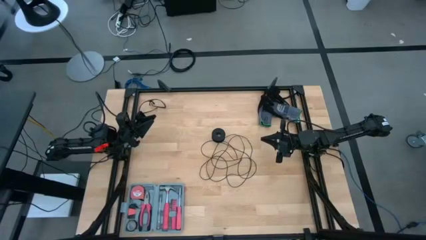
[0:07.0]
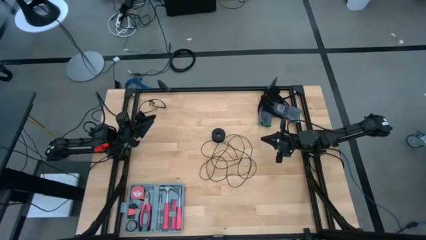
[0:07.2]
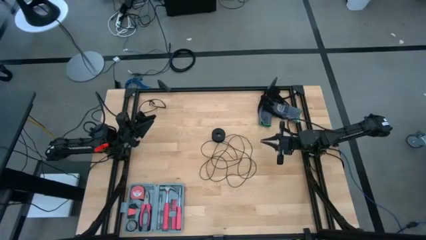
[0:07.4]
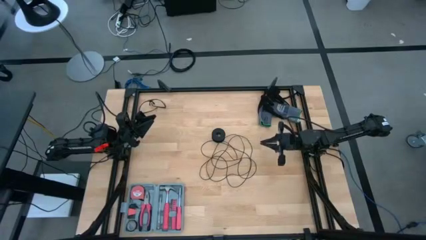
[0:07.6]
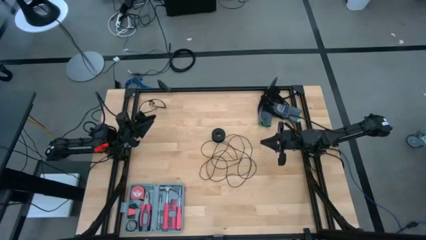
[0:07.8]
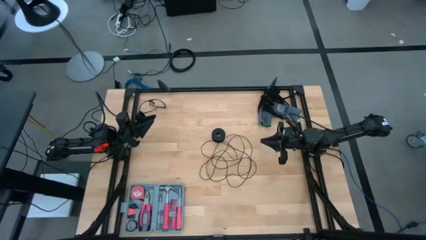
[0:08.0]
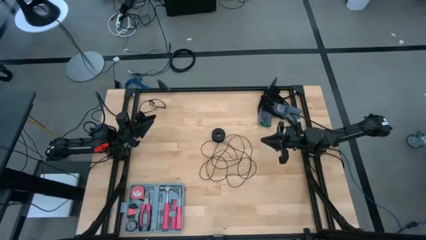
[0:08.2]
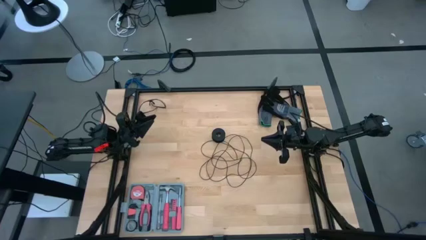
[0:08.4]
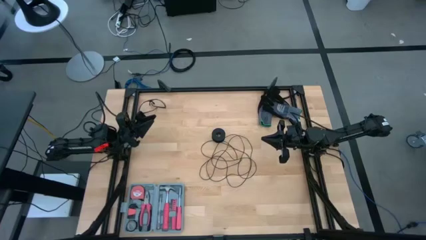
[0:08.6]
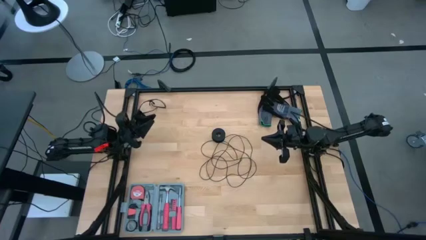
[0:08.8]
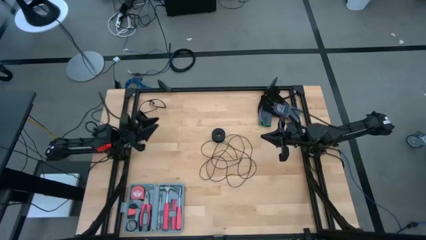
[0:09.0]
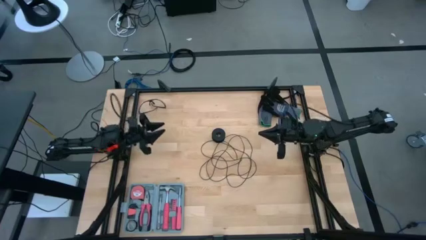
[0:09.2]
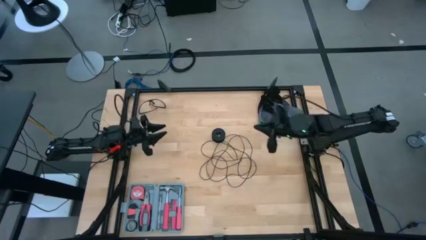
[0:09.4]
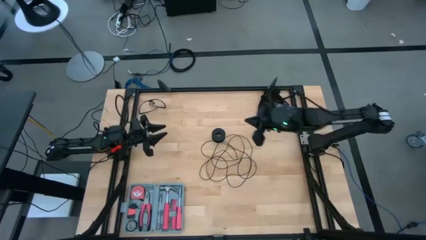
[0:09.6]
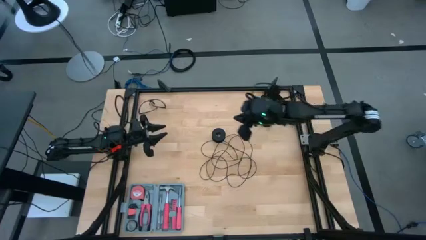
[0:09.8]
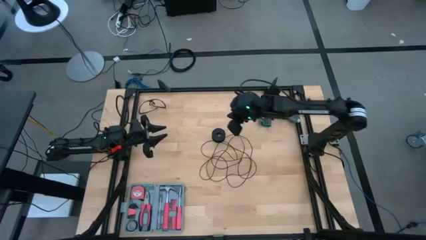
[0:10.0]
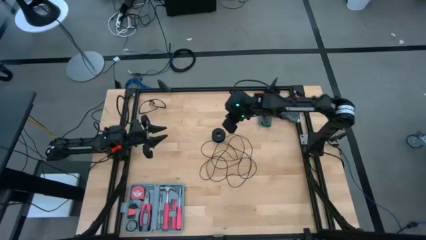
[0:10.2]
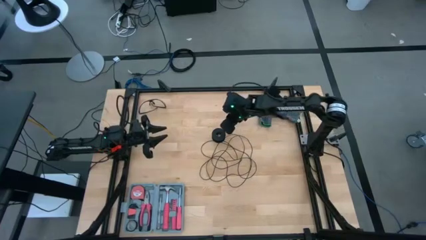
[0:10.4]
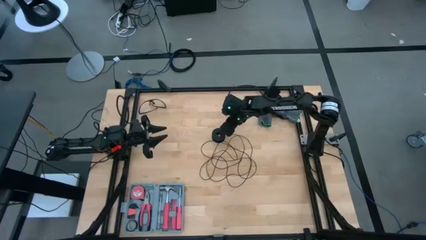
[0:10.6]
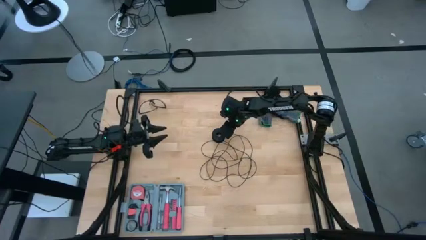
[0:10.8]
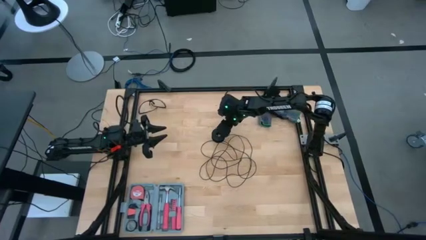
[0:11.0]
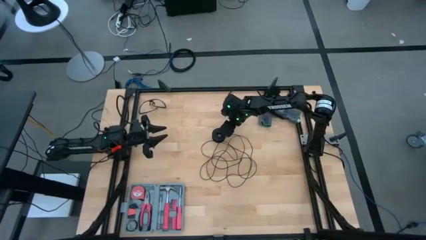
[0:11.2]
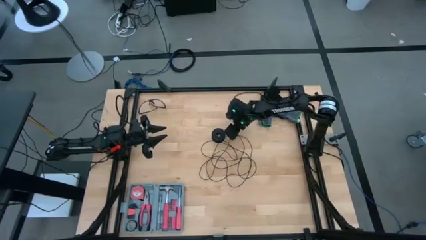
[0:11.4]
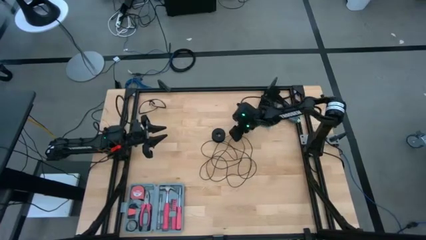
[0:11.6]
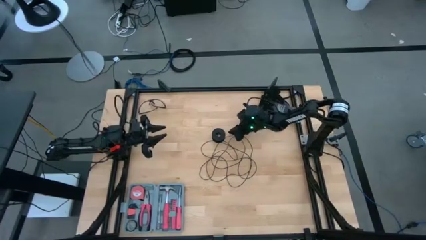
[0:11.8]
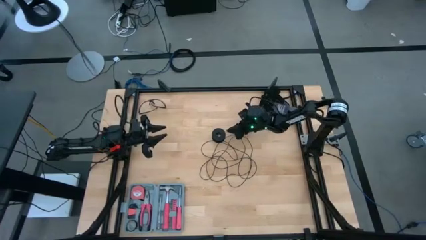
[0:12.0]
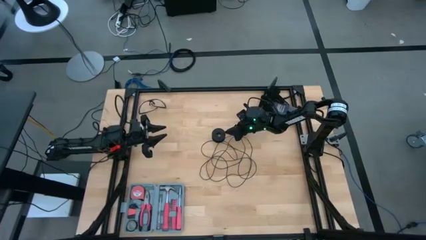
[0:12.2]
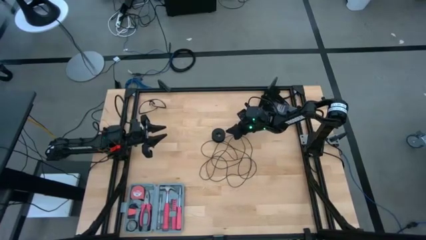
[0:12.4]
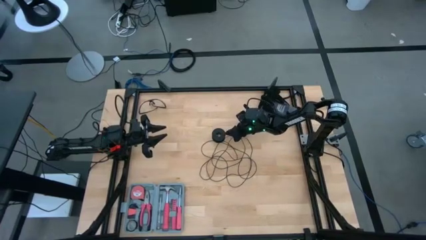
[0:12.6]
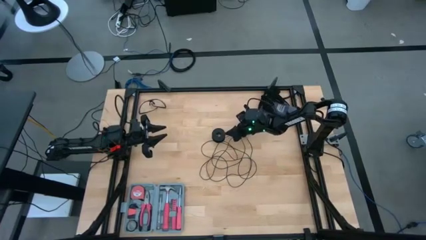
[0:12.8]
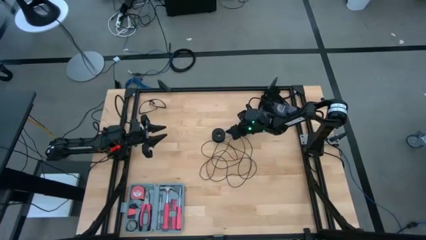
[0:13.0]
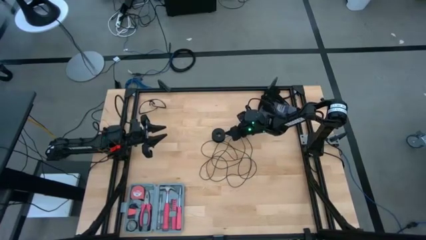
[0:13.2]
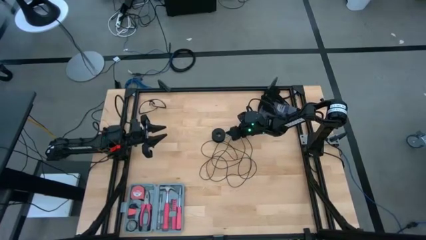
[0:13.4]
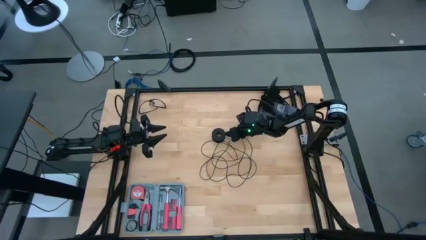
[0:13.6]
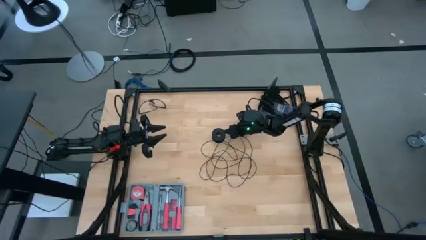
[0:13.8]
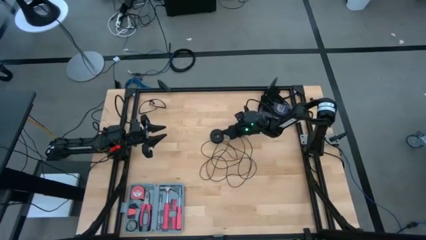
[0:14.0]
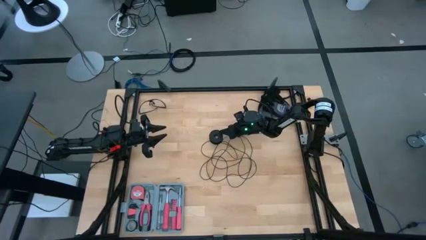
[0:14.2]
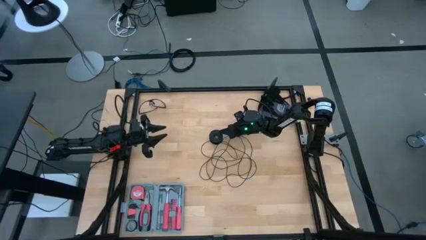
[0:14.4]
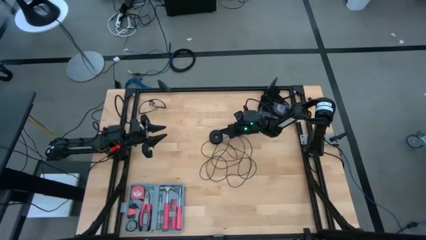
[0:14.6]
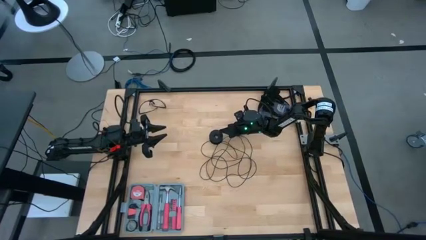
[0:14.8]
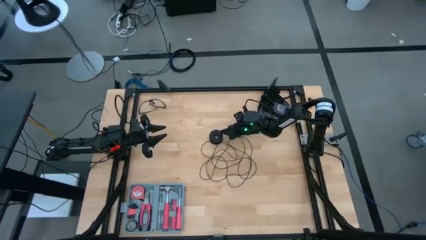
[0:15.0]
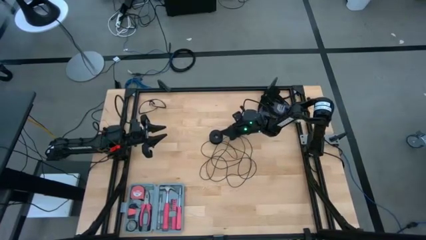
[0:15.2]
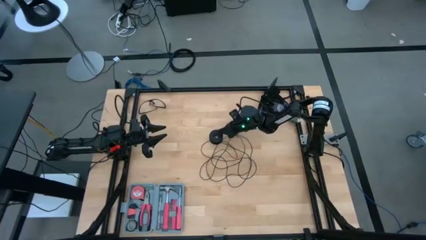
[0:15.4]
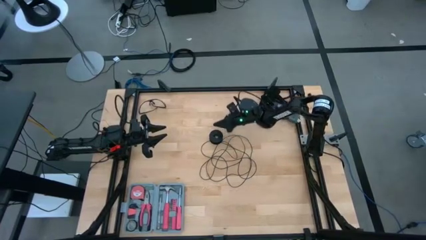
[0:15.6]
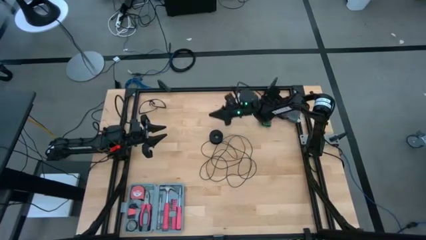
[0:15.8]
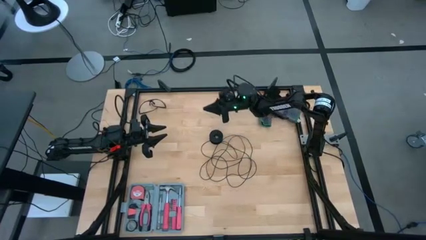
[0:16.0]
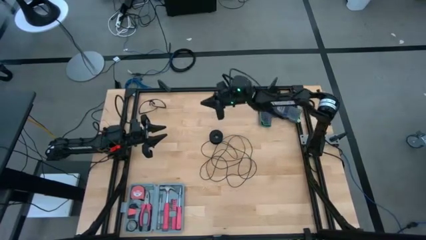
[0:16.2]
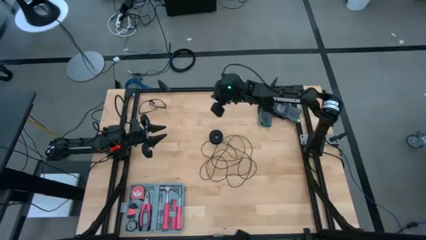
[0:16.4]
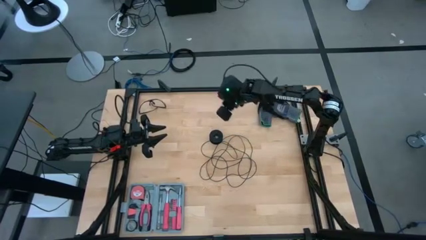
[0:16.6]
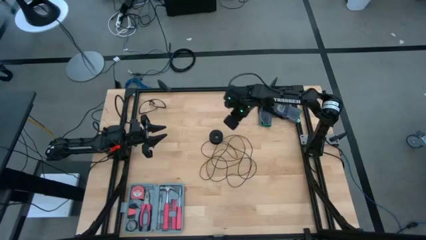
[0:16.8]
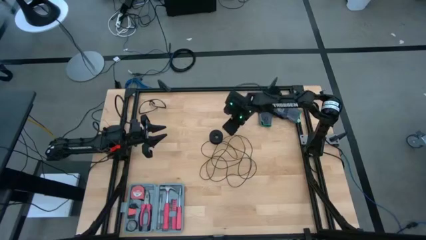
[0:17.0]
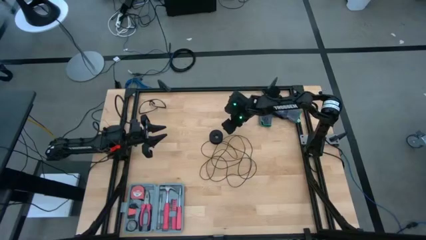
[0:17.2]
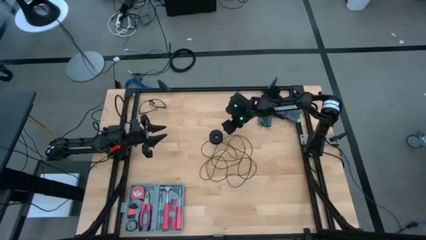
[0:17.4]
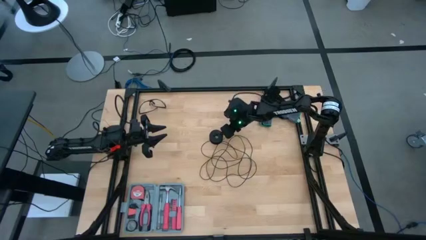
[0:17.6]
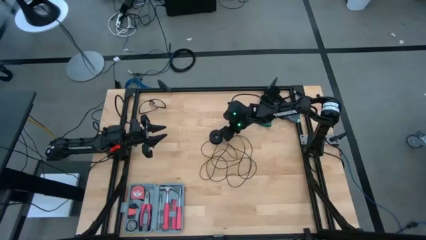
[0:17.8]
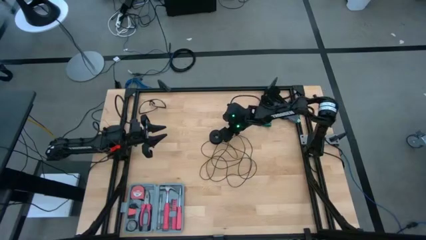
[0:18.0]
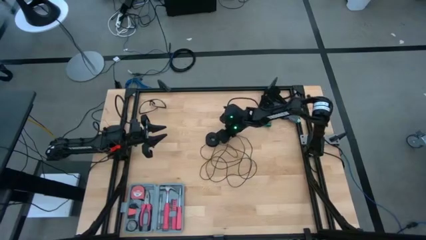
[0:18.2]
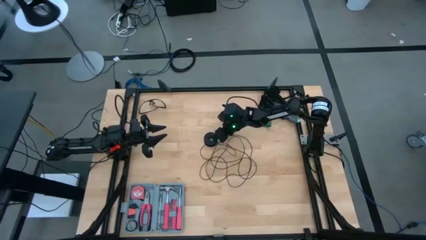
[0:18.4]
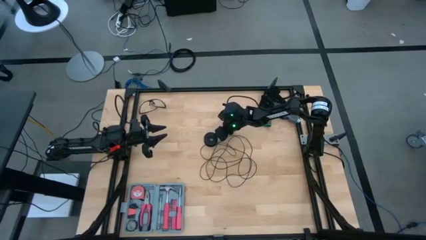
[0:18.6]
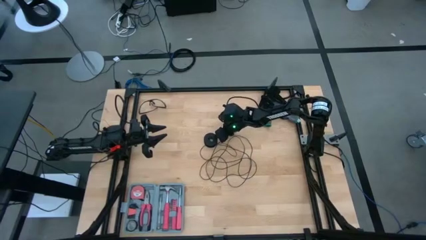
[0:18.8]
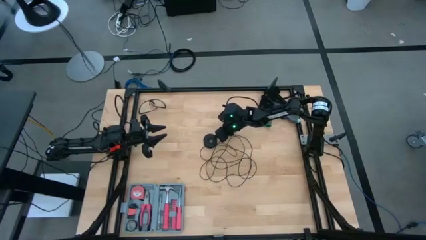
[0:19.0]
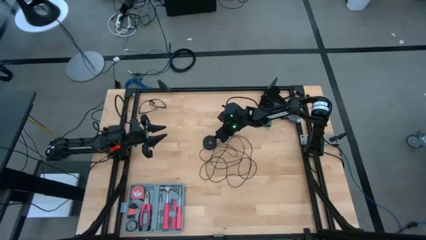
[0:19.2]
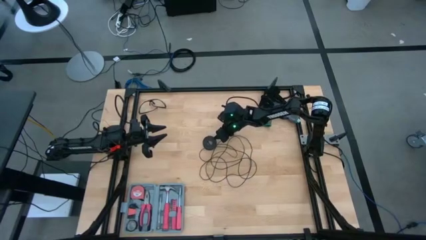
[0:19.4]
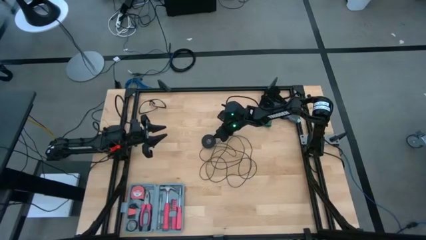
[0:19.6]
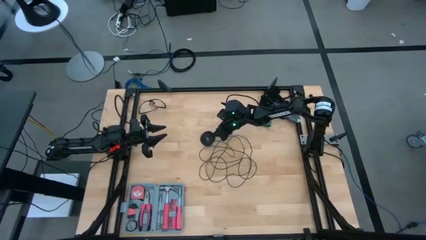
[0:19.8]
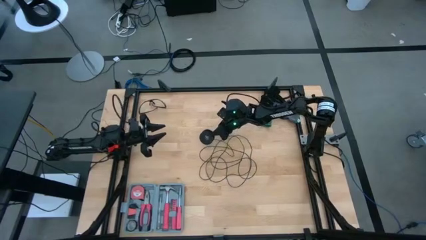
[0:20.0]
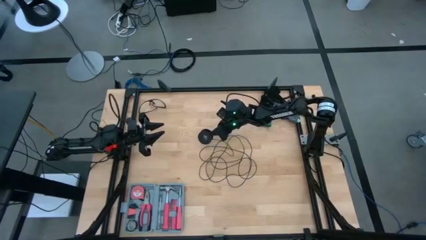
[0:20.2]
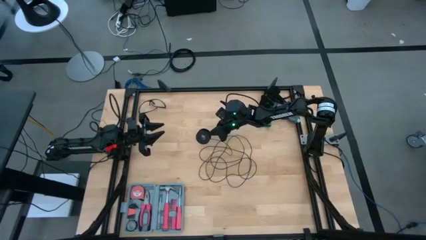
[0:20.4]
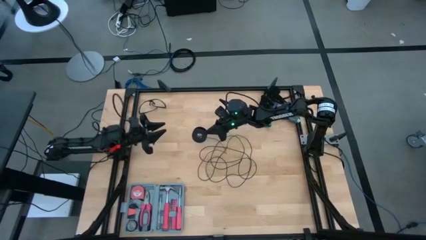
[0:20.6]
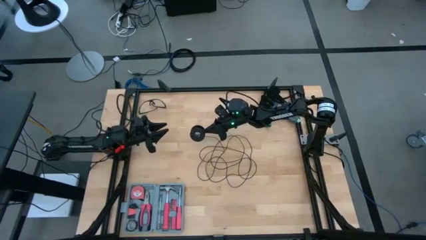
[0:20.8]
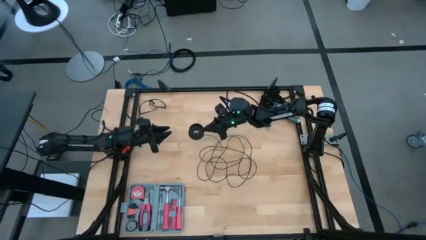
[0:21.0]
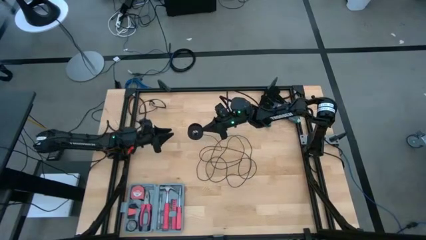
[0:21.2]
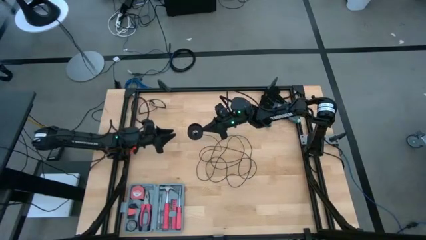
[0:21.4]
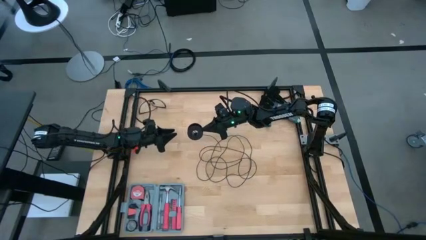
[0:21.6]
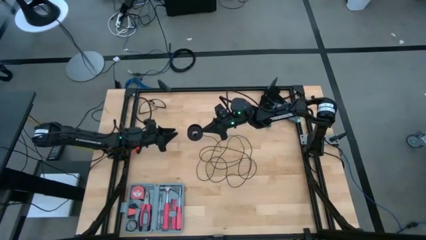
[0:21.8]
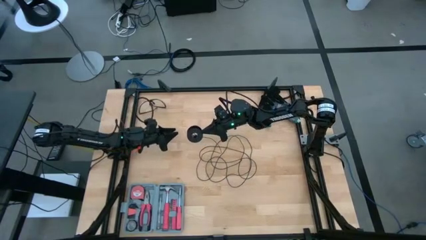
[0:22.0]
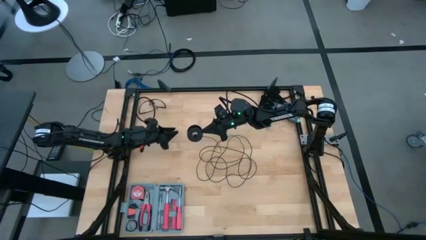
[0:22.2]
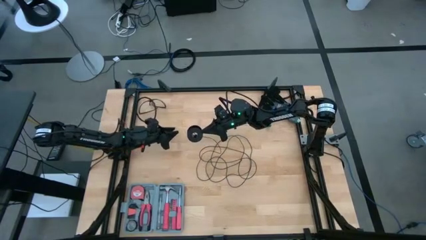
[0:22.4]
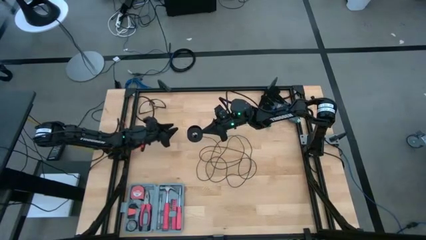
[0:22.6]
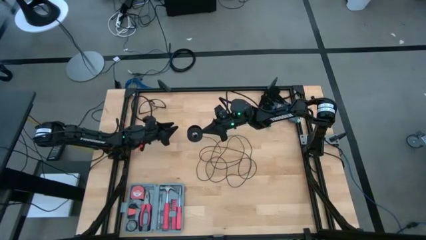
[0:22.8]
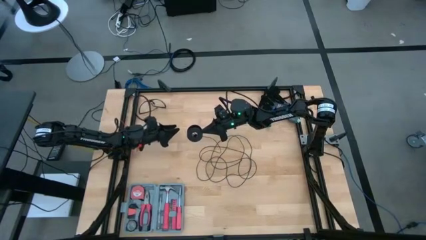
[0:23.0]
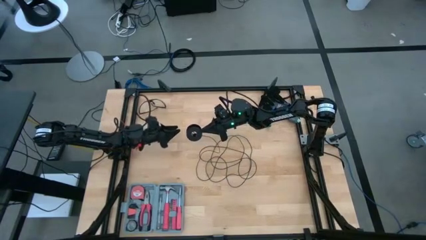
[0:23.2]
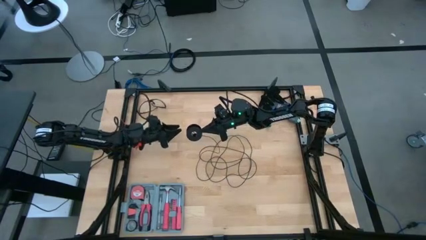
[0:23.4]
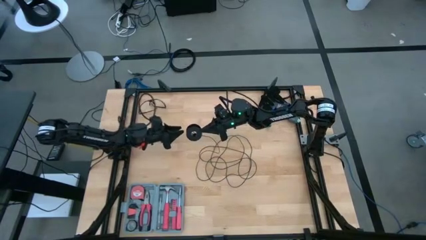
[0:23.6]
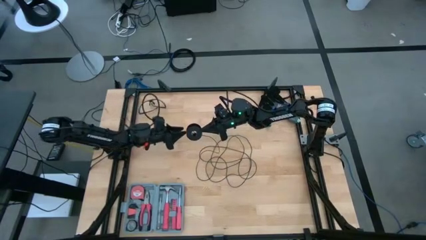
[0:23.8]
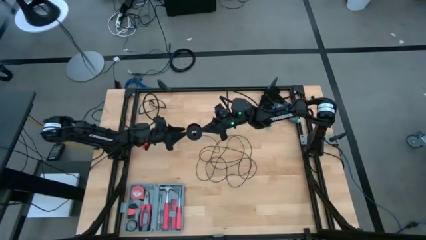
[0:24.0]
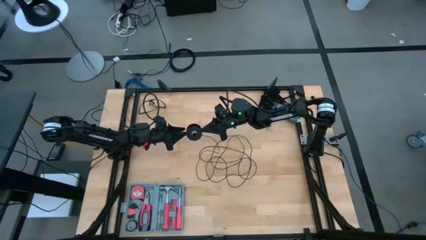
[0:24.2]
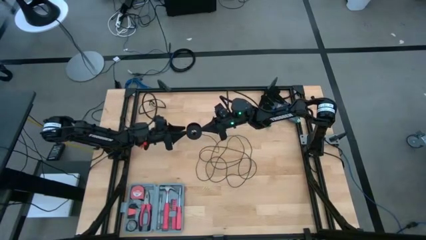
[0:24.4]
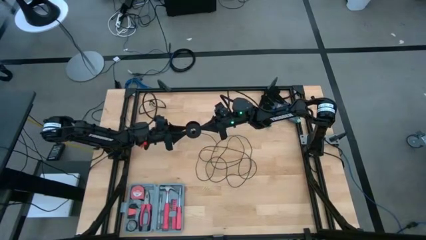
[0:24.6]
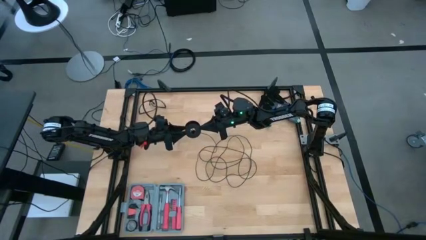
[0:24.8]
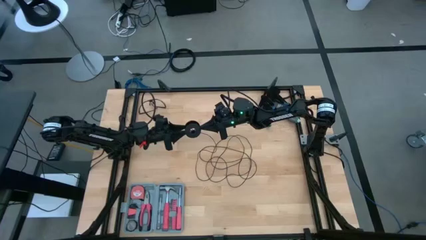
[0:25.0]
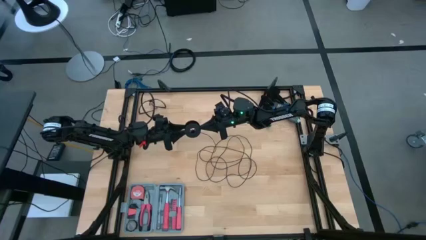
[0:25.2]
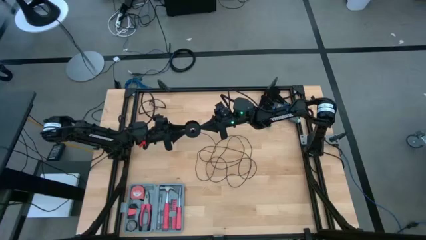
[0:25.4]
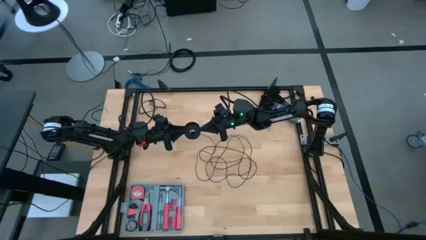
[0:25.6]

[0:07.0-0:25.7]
Task: Coil cords
Coil the black wire onto the black spool
